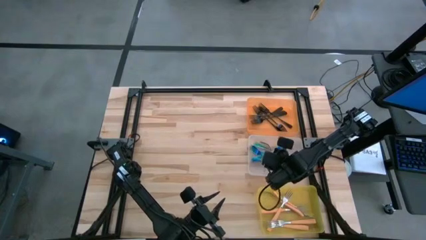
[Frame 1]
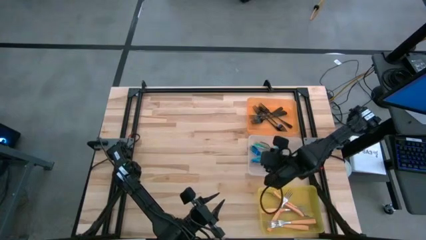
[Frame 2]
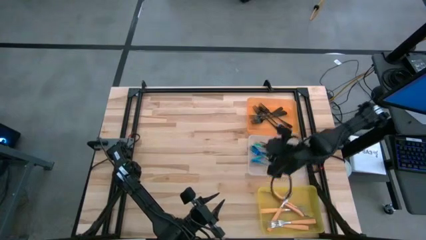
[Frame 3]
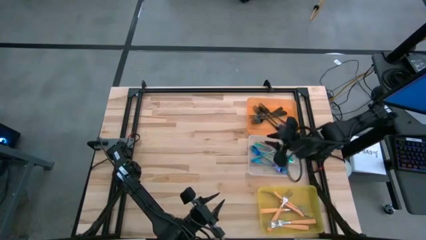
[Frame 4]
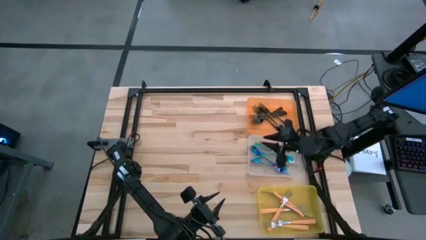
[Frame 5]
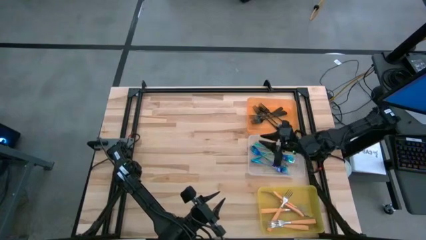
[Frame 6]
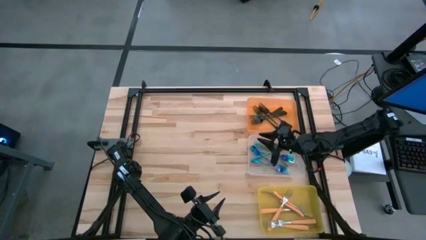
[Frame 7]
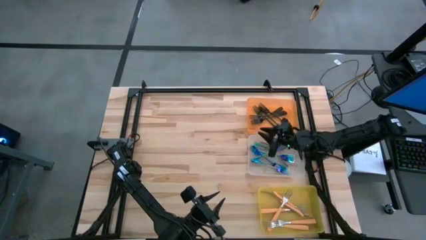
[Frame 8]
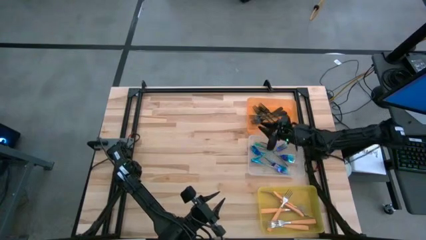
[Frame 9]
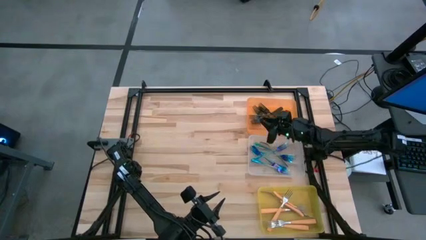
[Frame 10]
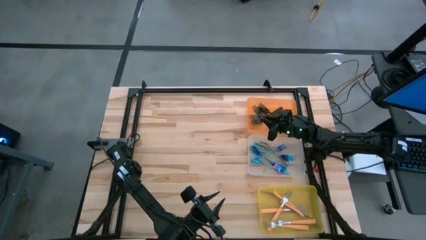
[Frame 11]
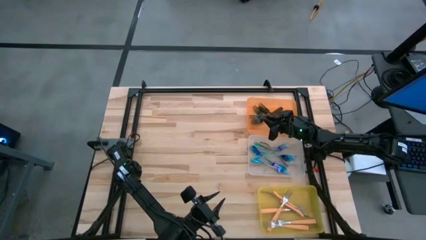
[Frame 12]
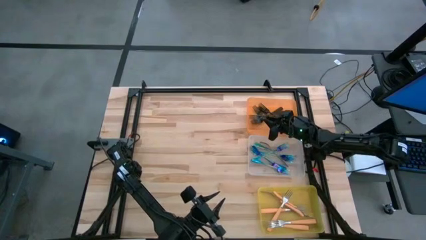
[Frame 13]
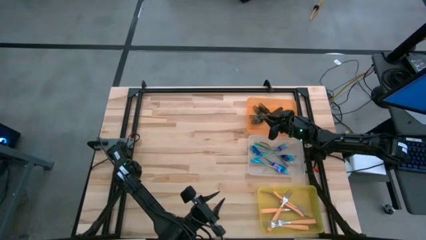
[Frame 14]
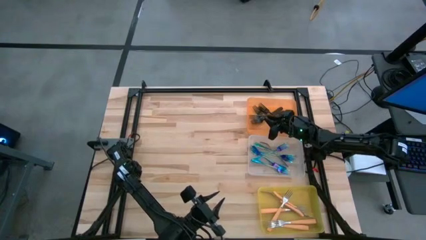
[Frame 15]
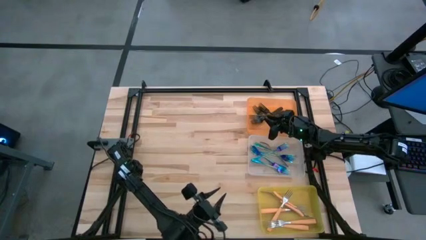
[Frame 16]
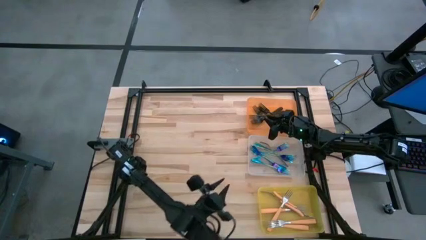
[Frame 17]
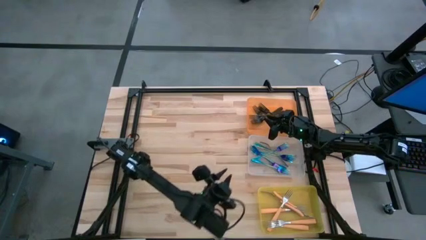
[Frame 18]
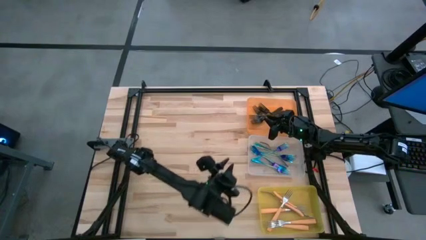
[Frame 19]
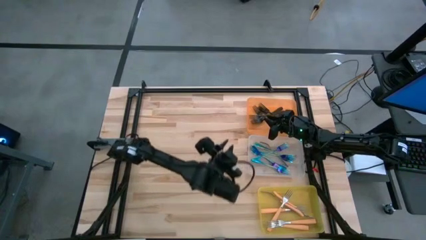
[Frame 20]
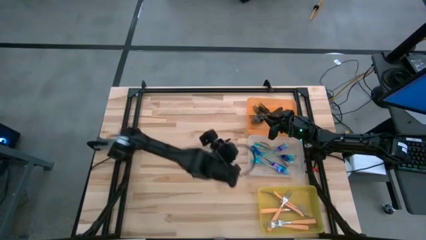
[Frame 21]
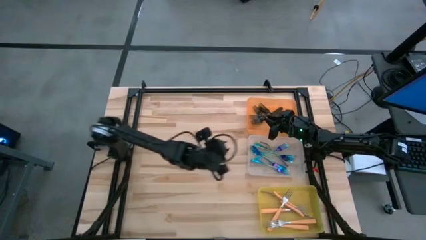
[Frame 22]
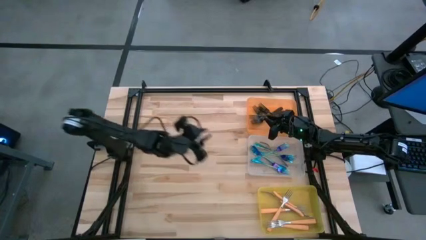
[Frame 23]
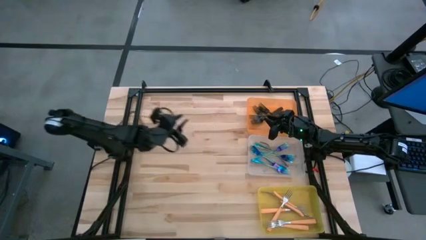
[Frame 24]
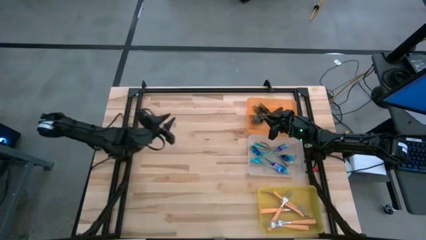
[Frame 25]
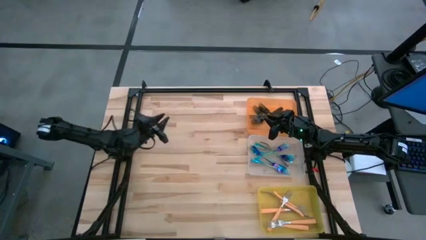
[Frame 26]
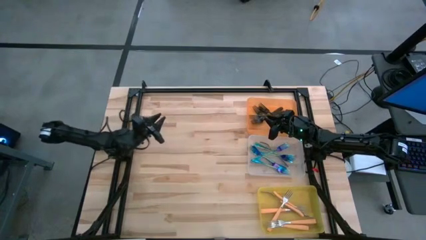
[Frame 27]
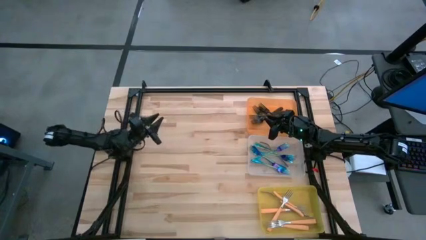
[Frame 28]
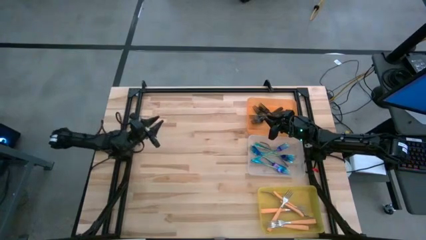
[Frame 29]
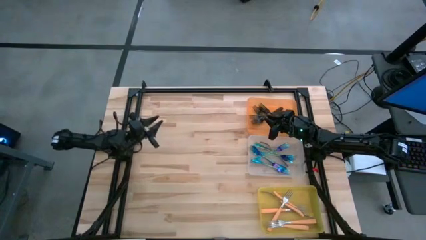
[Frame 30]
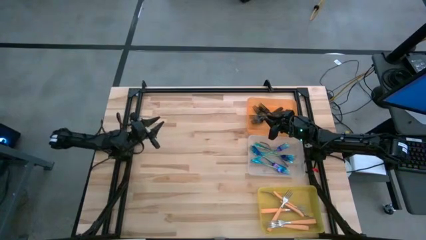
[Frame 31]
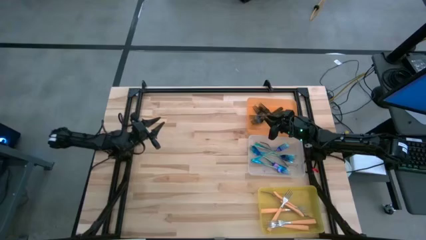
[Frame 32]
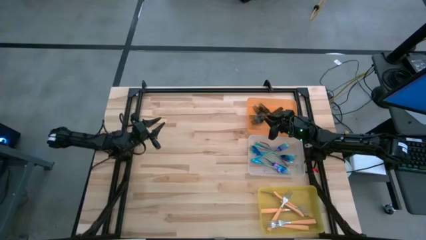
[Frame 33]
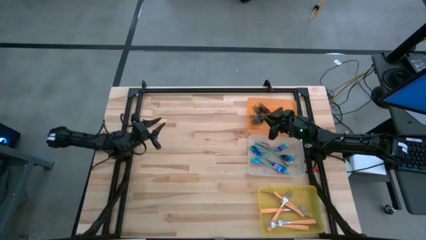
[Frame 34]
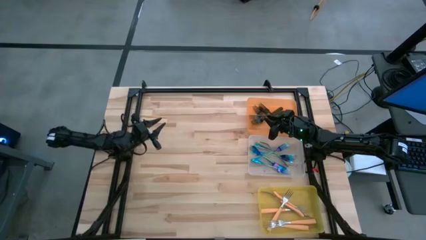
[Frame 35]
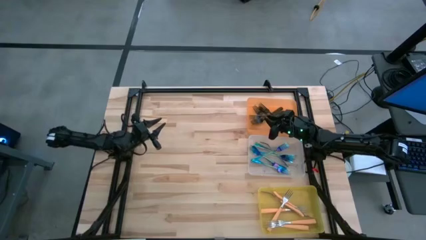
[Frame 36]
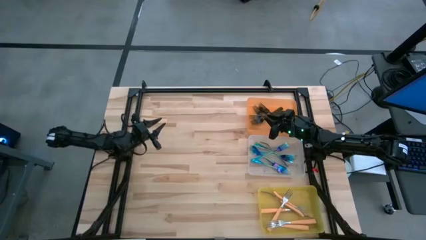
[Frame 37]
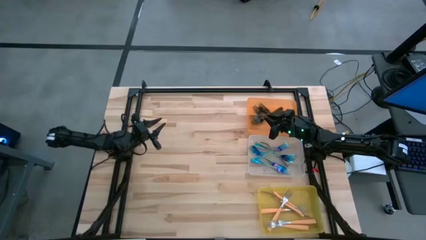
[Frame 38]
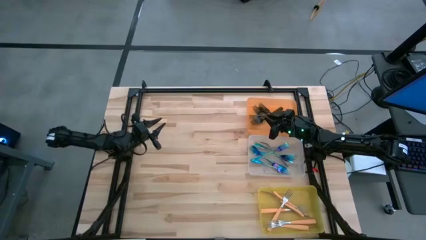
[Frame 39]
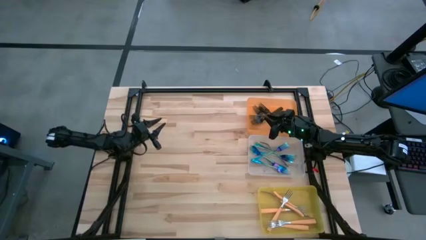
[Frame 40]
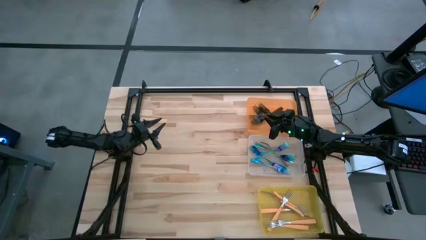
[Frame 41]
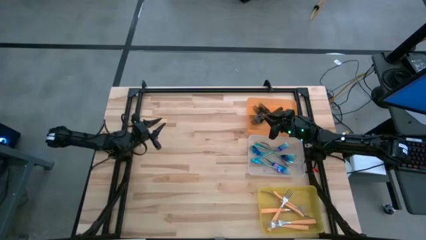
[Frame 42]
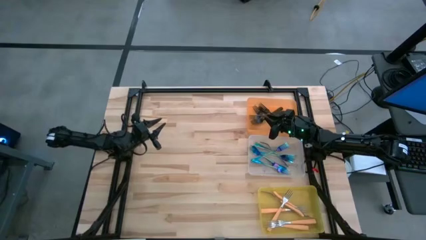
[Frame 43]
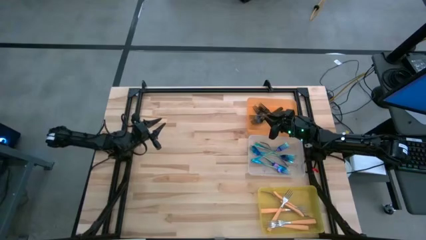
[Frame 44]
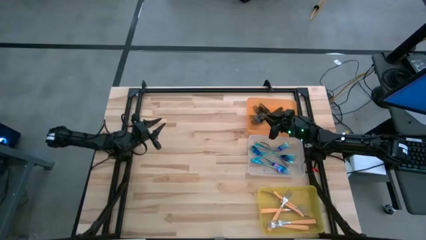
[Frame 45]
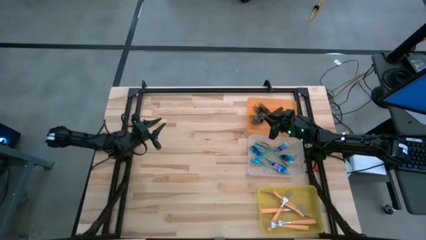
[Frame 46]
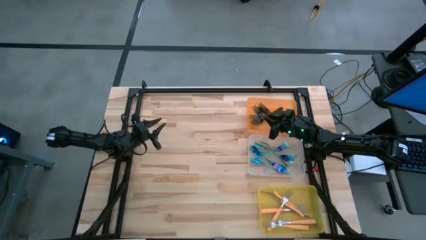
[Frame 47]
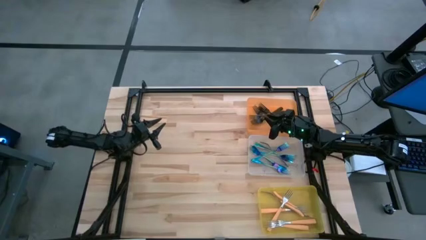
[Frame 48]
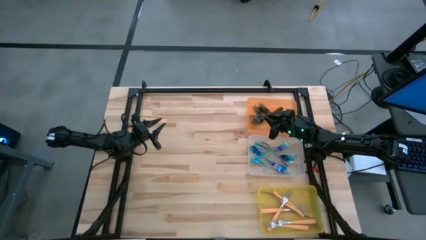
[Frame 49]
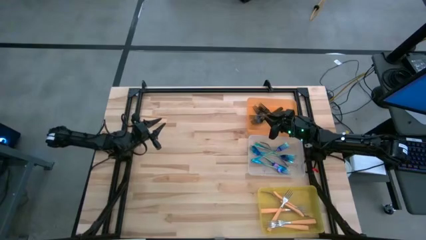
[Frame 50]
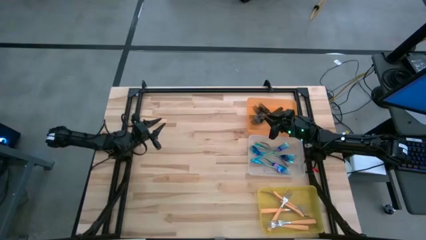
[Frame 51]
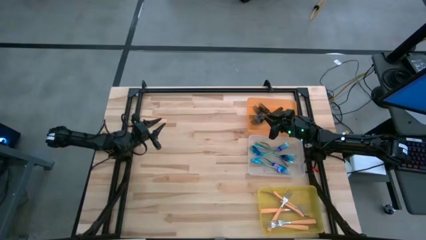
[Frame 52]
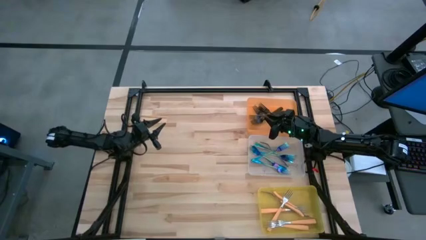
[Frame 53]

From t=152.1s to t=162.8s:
Task: Sort silverware by color (type)
Return to Home Position

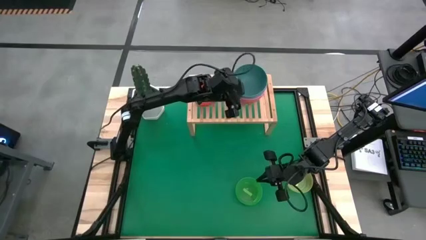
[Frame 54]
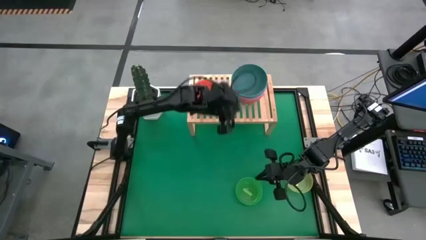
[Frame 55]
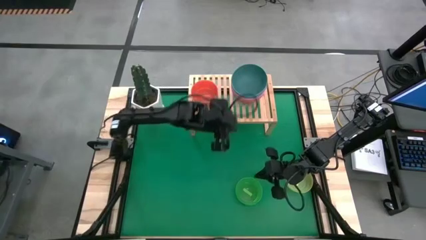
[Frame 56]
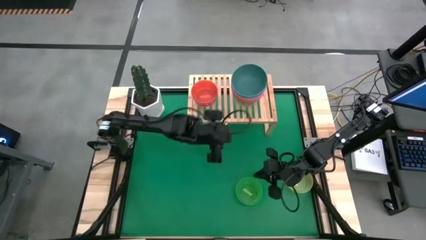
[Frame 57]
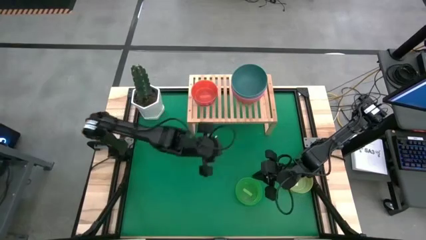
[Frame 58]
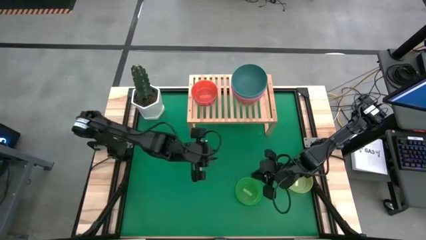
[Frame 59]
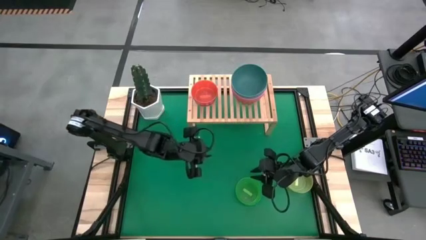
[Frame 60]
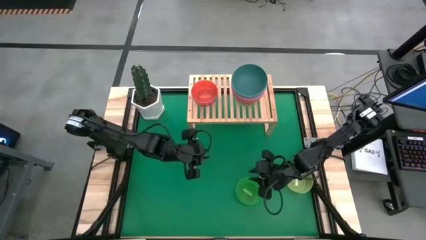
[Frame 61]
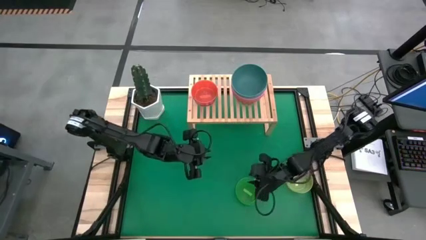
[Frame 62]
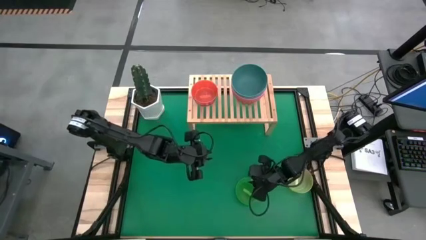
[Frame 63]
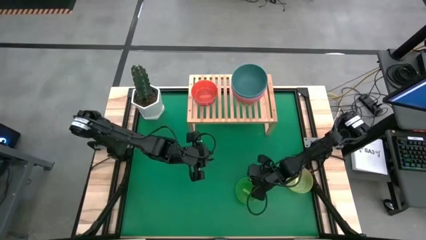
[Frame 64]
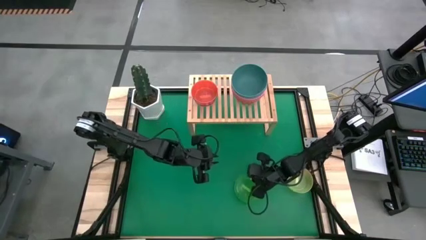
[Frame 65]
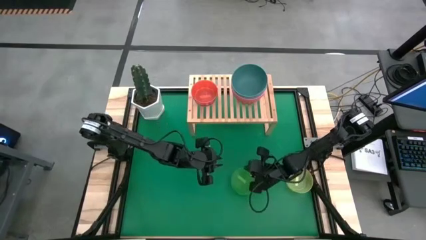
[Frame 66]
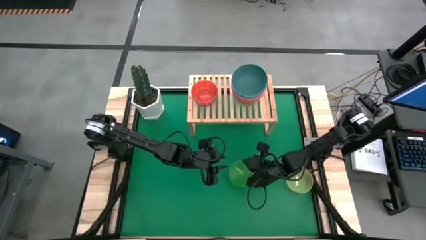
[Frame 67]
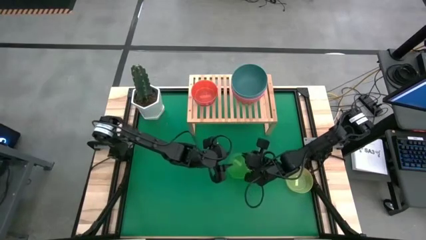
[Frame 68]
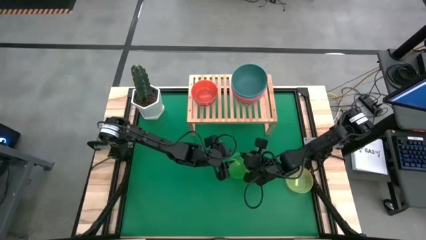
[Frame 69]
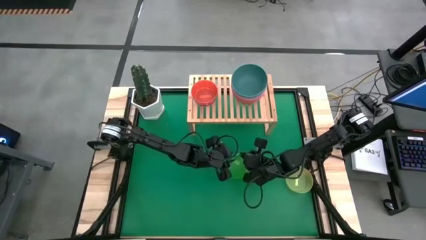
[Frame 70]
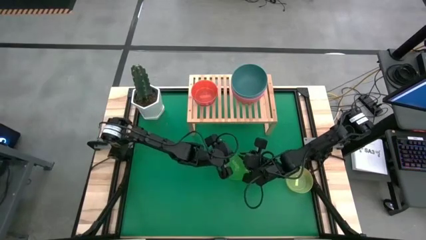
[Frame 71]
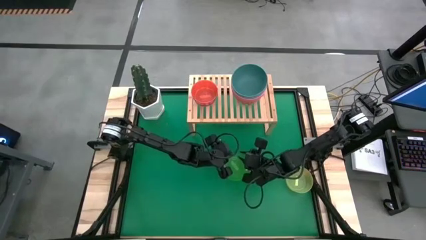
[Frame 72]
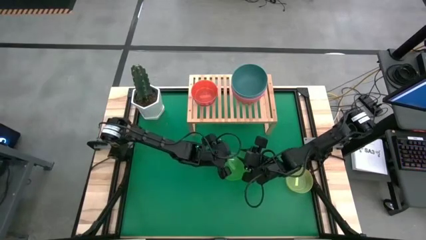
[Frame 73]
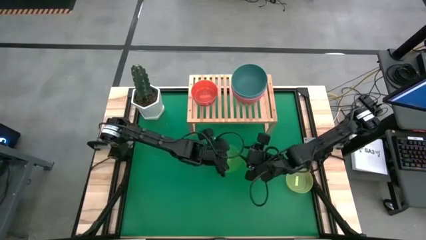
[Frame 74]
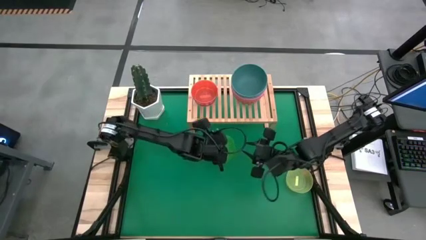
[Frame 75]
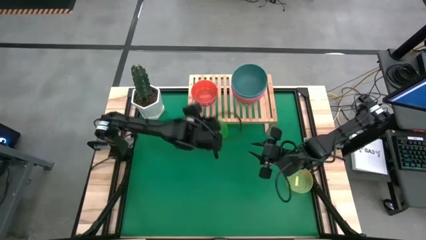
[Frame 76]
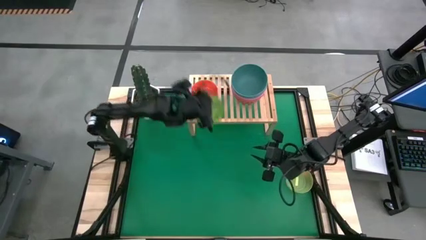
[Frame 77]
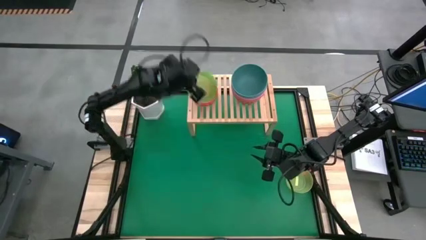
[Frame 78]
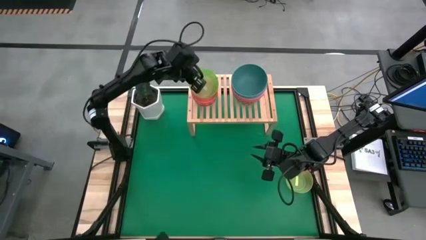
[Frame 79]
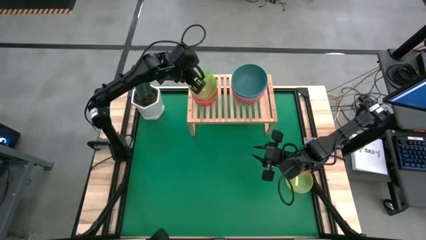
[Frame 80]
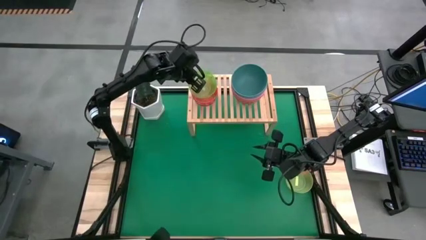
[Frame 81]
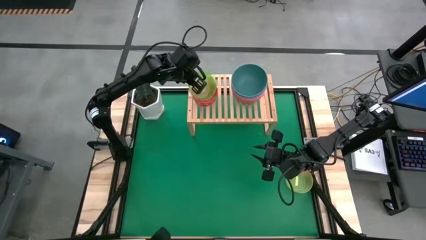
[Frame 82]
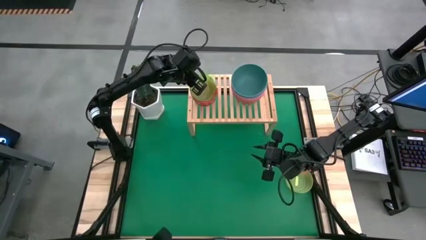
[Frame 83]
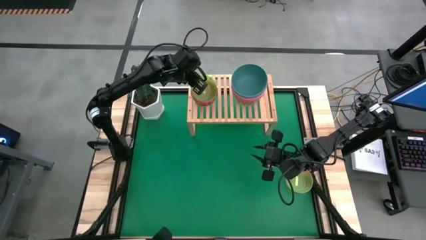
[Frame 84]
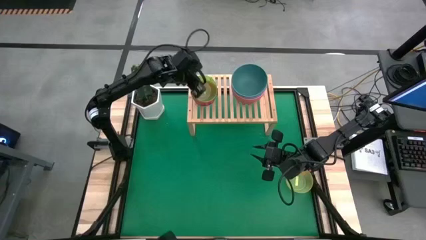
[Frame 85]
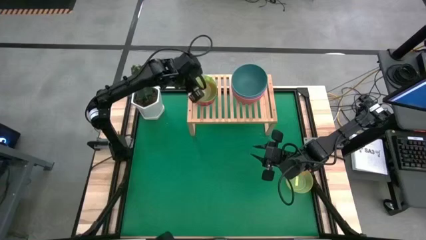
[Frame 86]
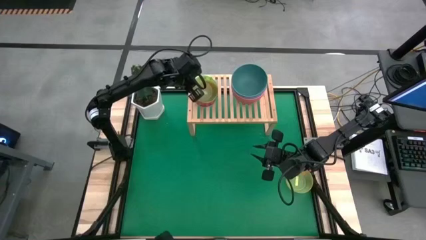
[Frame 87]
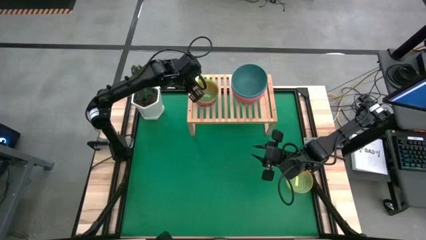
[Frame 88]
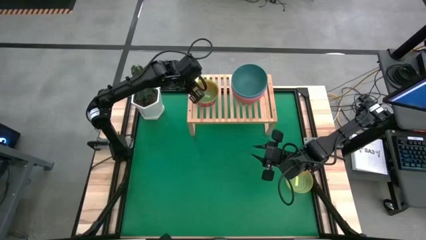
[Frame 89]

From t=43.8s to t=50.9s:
Task: Place and stack bowls onto a shelf
Stack the green bowl on top of the light orange bowl on the shelf
